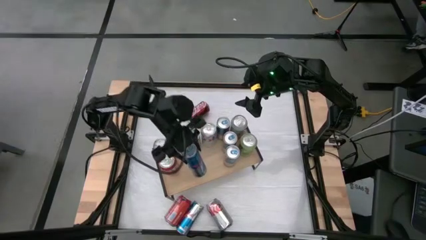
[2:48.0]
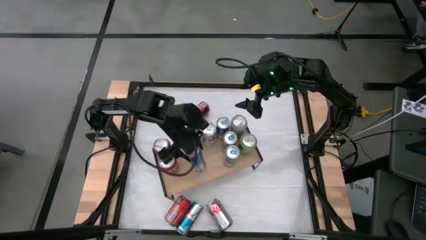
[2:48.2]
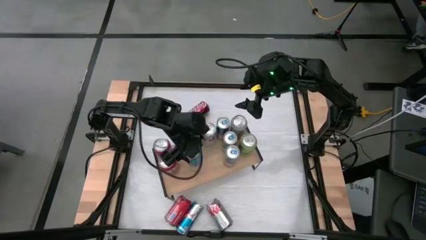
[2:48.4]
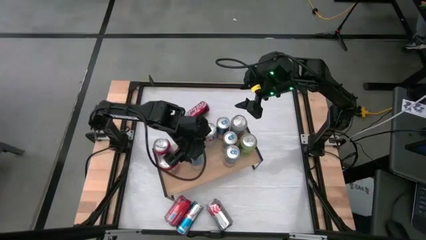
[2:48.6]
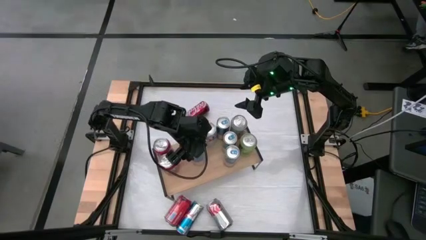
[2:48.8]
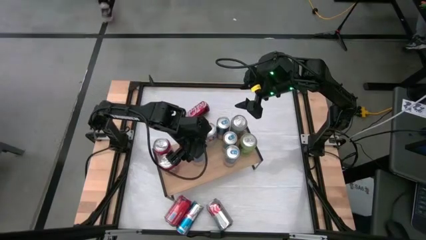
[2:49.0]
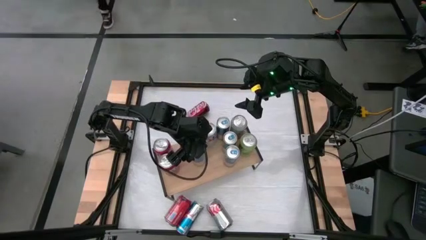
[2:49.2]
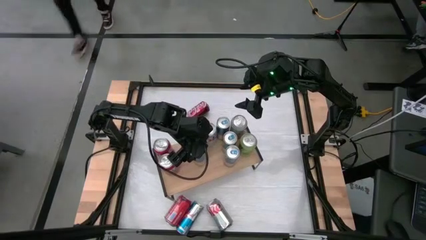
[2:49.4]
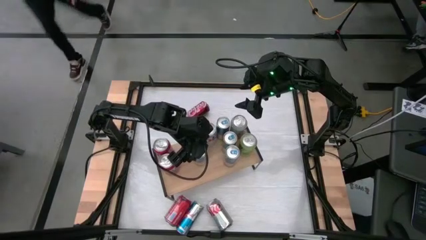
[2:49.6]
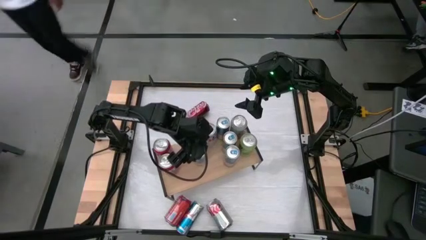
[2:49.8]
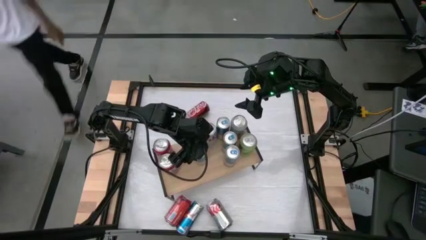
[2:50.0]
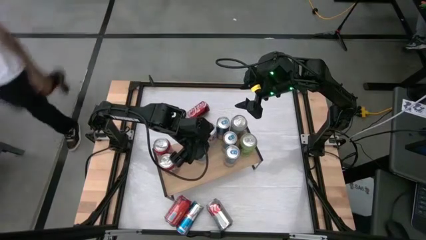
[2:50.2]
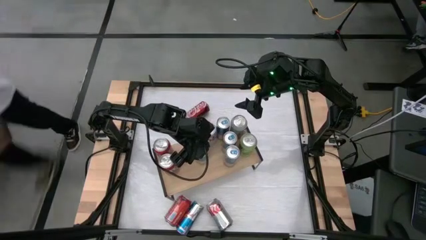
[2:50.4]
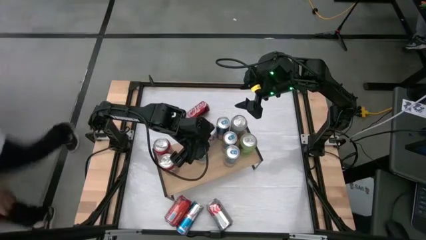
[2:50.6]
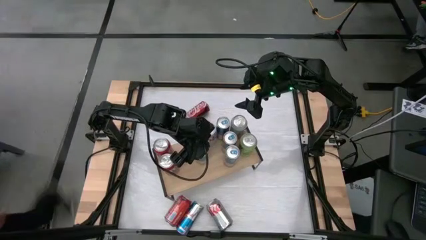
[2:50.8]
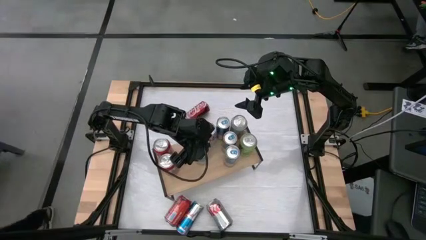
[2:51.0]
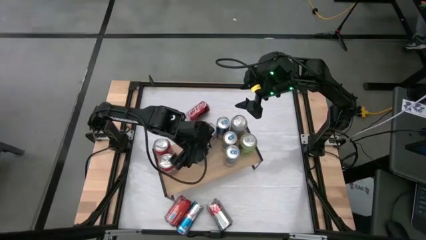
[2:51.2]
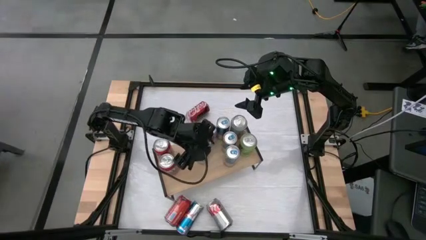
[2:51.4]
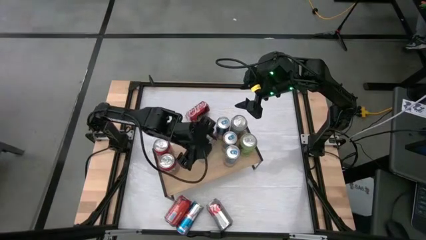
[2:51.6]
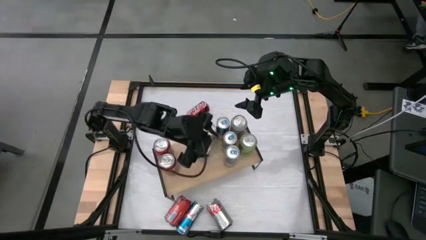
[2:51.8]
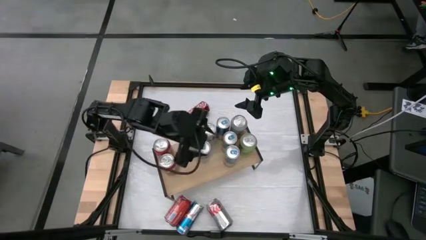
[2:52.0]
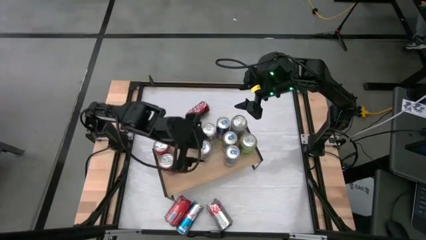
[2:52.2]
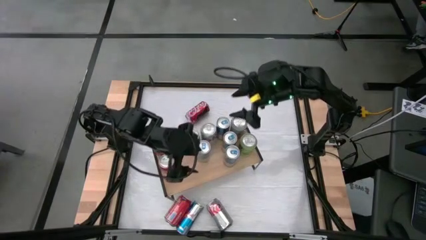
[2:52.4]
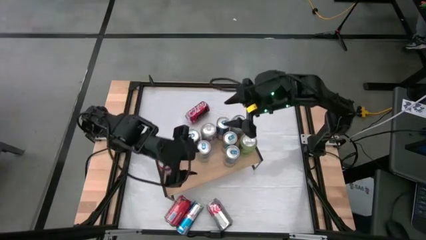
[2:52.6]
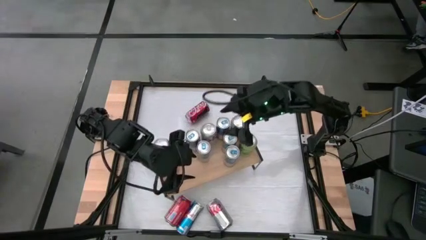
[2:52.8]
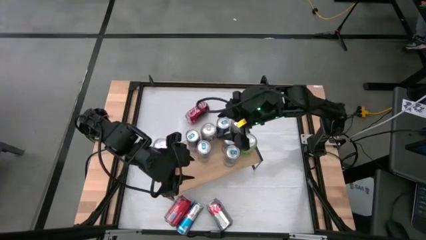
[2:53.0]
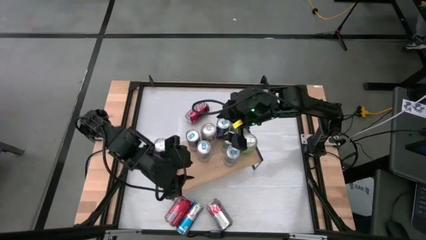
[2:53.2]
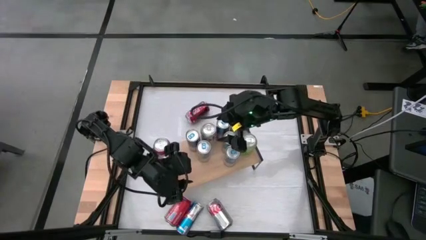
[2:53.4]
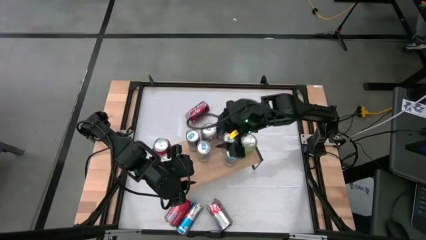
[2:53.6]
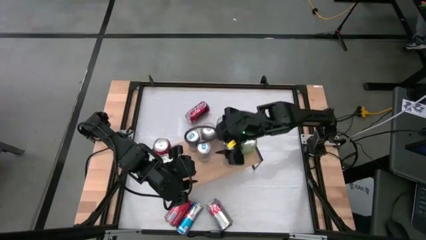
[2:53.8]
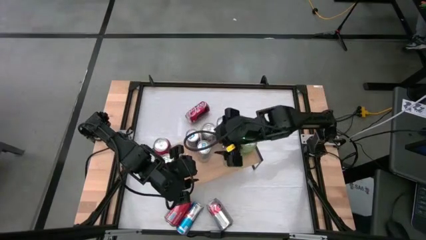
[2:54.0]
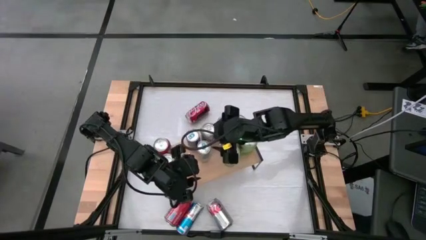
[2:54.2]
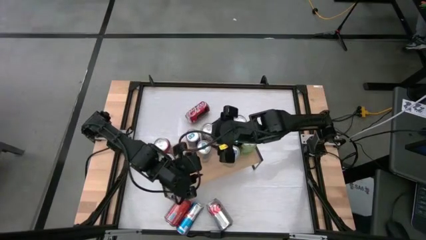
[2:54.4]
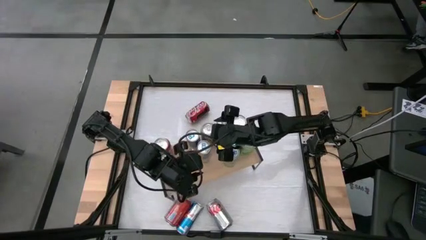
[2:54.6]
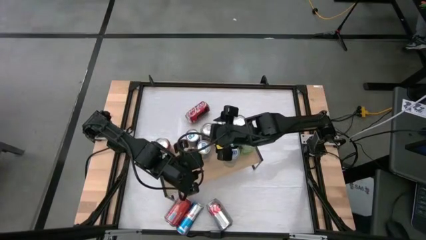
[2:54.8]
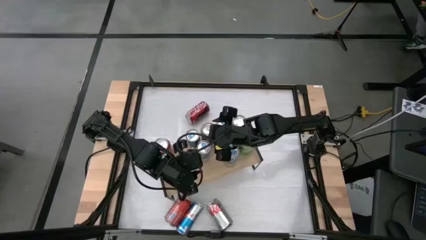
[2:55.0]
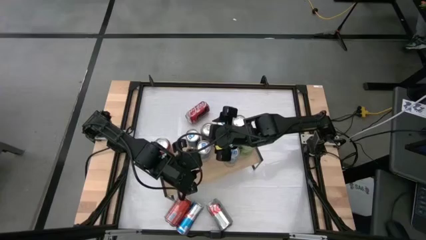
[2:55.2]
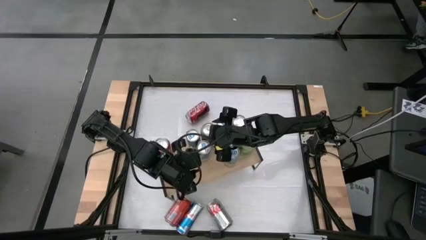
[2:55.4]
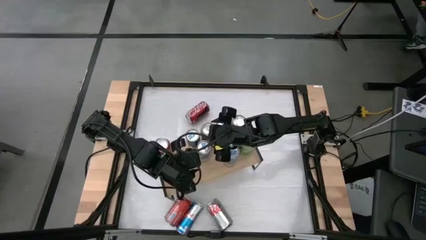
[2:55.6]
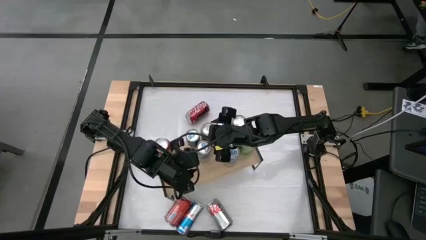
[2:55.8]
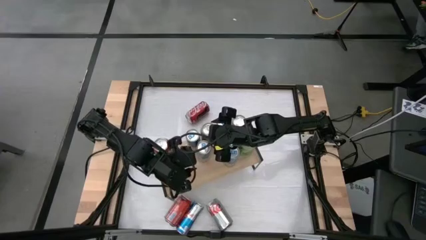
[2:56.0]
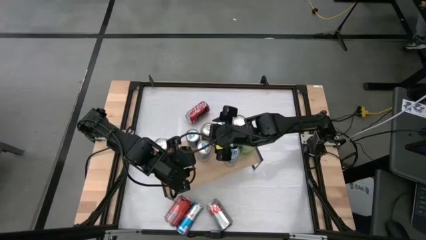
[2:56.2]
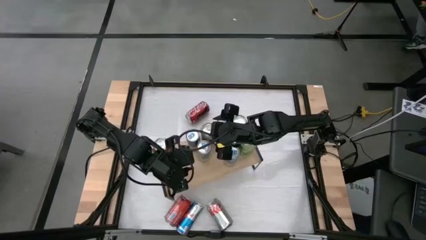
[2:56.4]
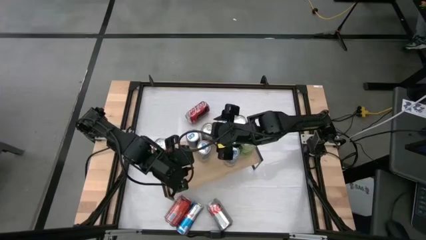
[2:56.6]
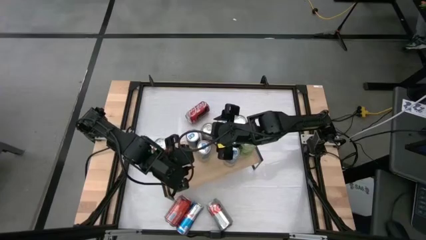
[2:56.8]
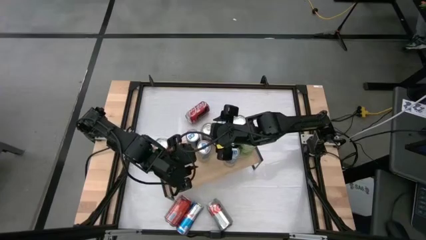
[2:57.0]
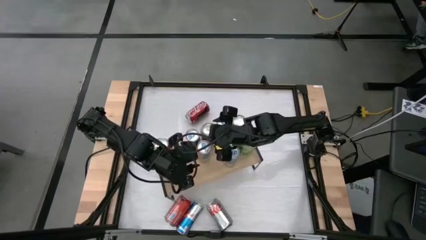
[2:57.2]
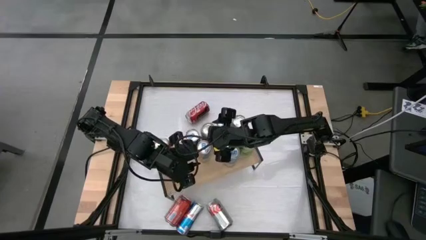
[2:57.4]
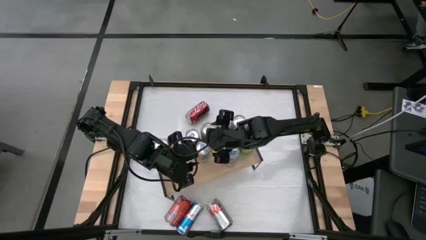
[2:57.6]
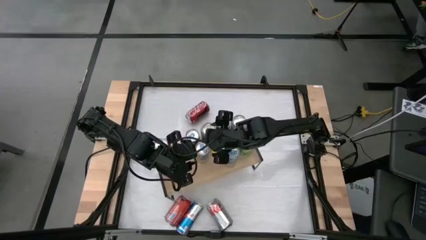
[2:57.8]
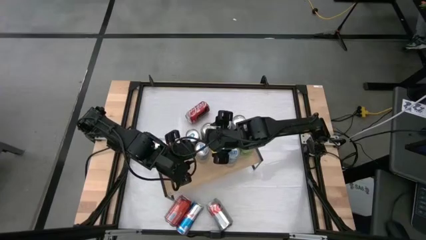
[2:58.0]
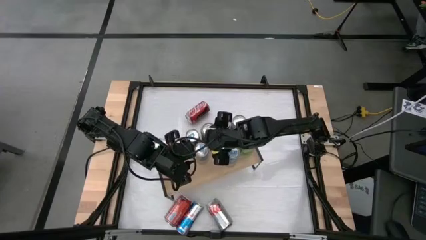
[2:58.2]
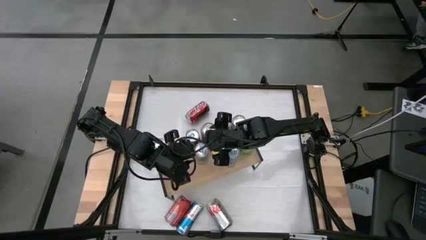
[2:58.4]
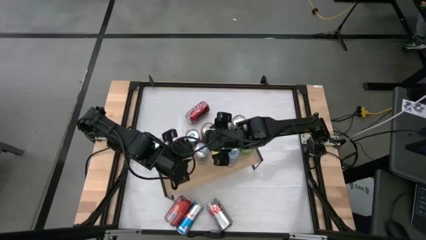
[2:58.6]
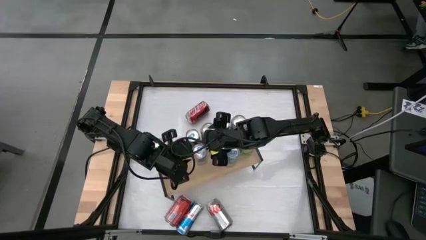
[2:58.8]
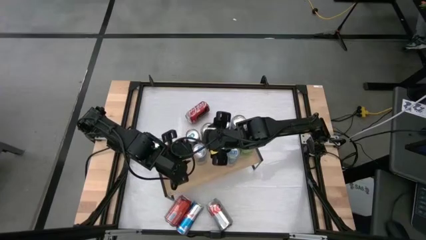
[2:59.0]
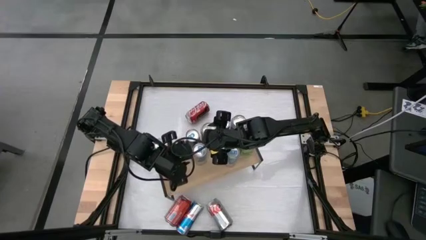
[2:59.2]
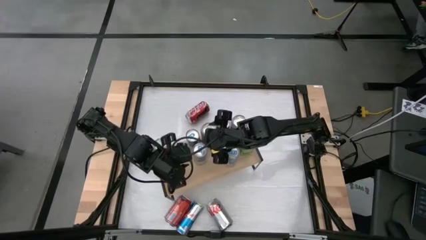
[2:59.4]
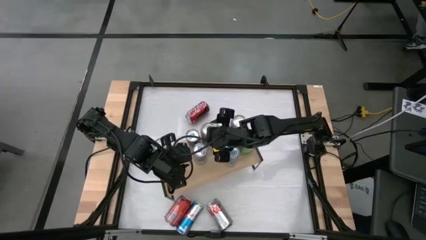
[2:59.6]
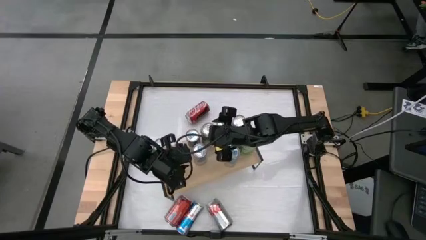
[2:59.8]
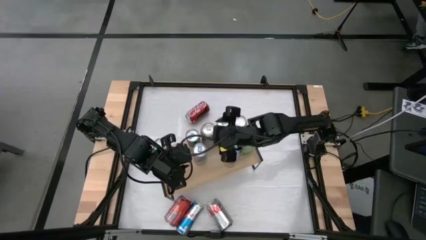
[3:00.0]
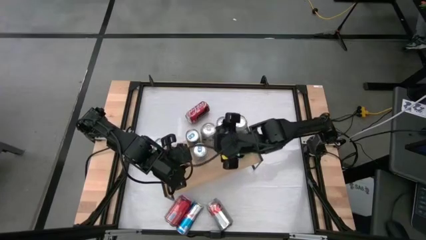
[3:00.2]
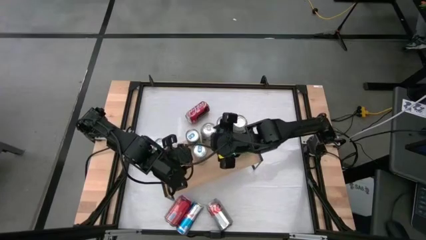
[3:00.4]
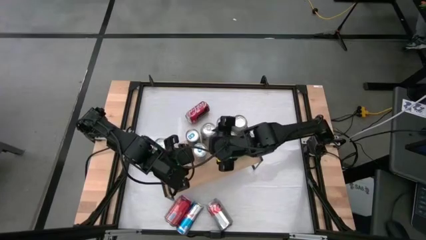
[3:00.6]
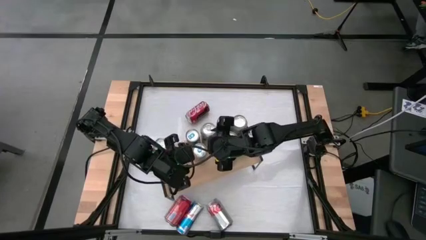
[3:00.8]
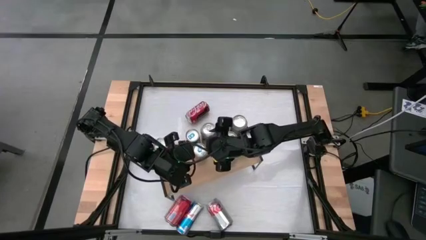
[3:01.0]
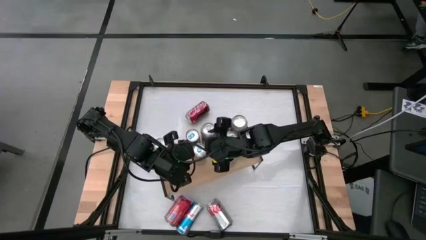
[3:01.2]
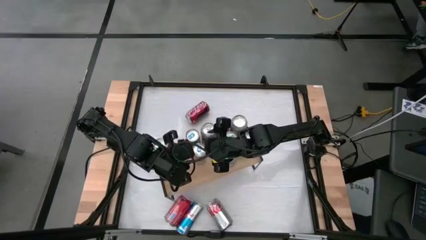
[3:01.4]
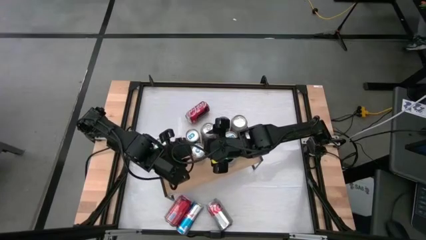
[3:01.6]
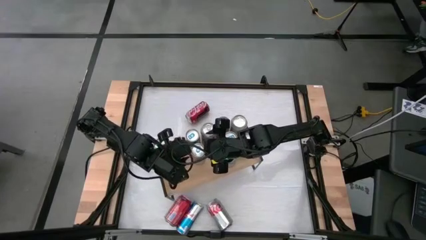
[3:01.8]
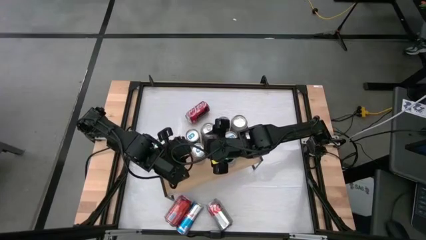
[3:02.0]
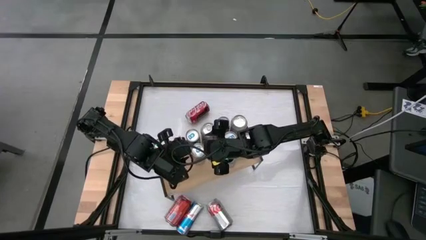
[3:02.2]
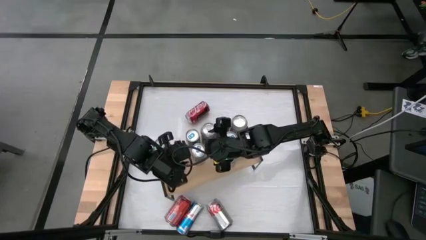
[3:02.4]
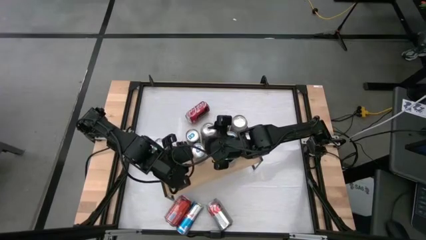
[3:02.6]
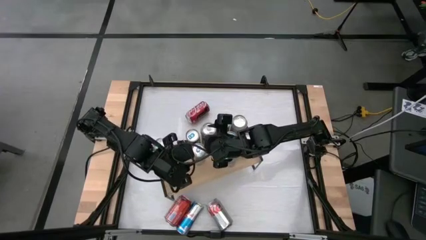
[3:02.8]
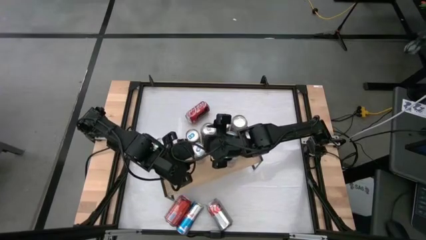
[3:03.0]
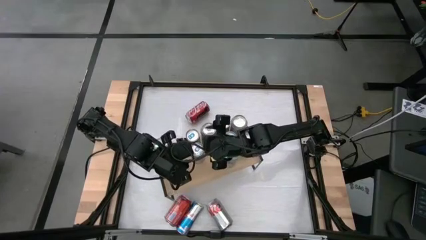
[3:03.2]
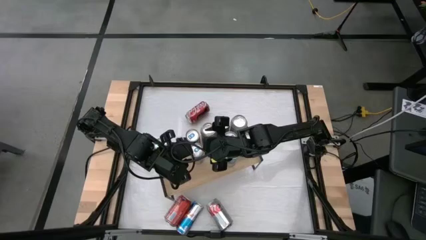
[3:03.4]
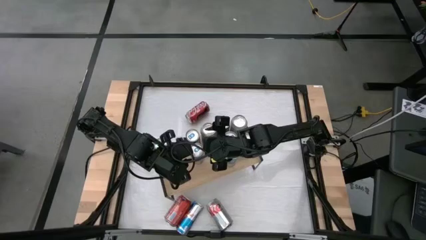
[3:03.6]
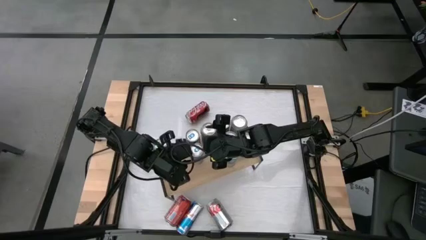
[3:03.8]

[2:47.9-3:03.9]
Task: Place canned beverage on shelf
Put the blue soda can on the shelf aligned with the other blue soda can
